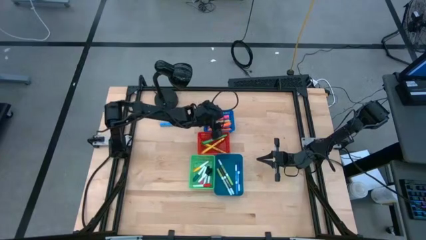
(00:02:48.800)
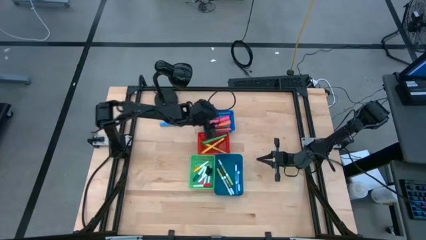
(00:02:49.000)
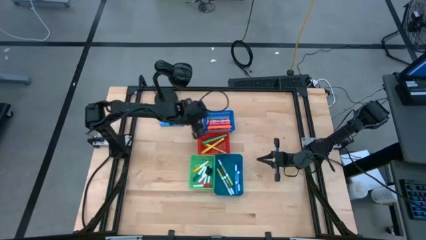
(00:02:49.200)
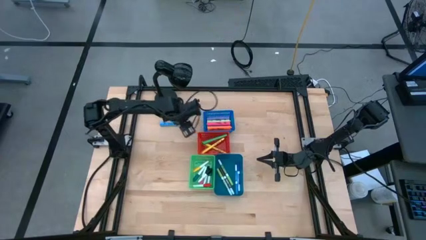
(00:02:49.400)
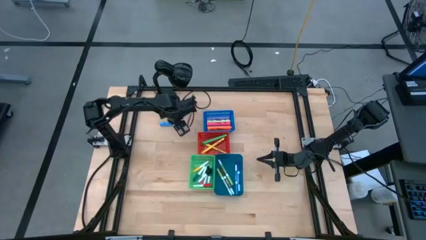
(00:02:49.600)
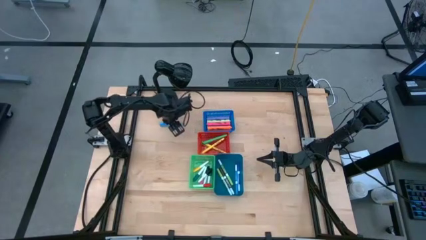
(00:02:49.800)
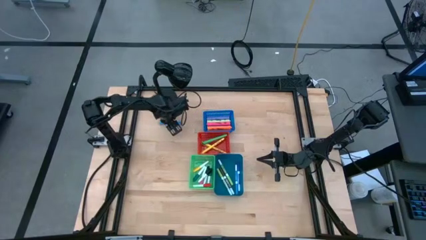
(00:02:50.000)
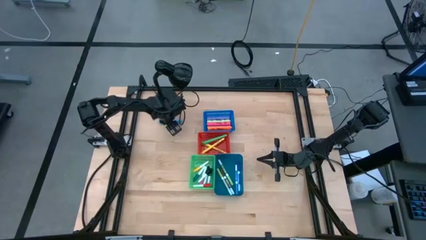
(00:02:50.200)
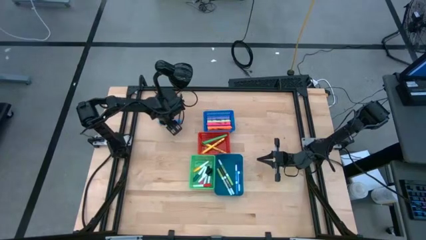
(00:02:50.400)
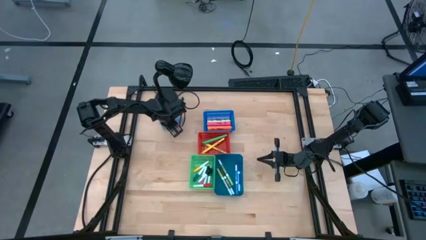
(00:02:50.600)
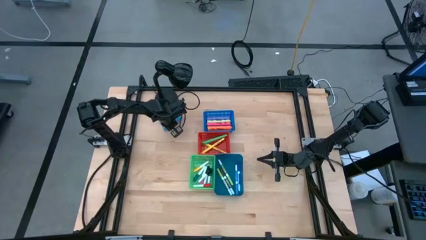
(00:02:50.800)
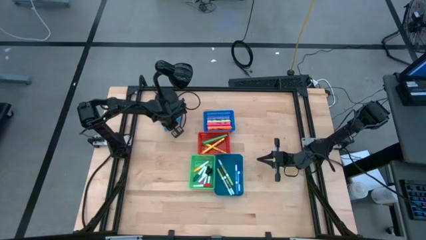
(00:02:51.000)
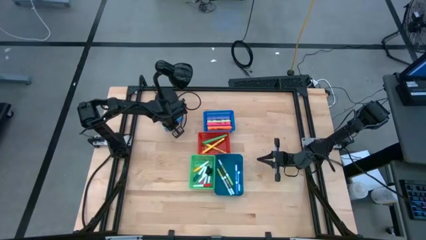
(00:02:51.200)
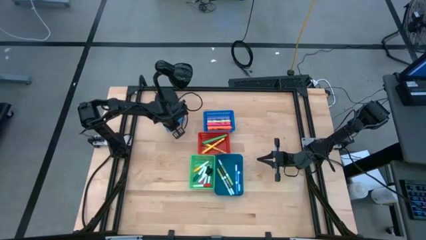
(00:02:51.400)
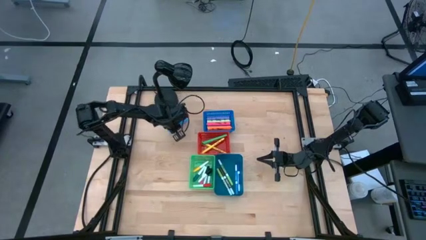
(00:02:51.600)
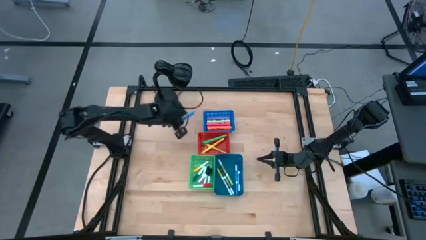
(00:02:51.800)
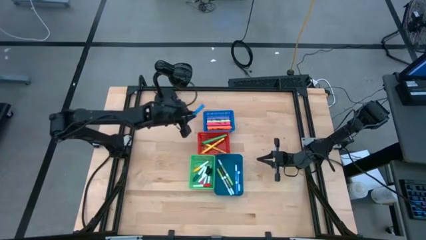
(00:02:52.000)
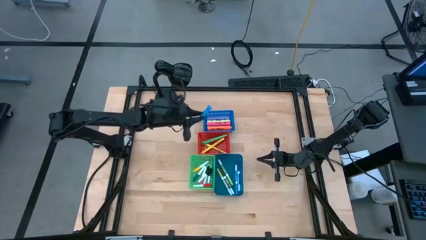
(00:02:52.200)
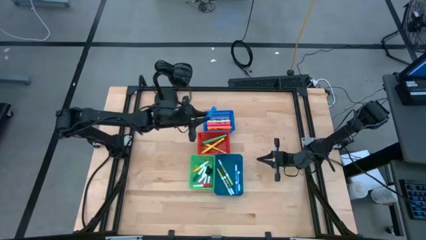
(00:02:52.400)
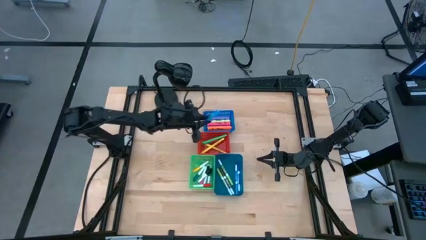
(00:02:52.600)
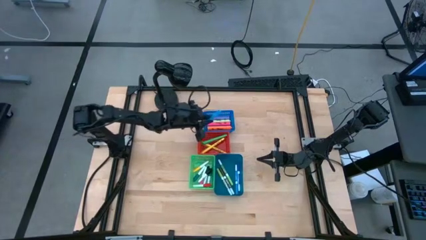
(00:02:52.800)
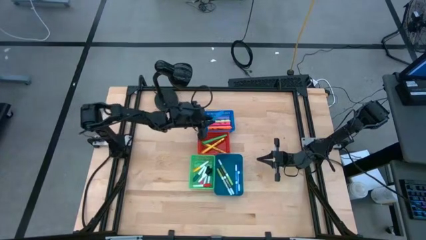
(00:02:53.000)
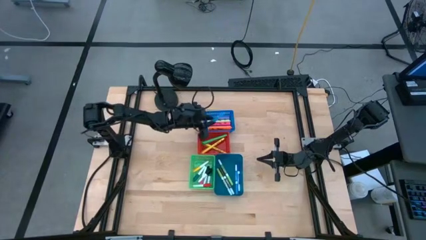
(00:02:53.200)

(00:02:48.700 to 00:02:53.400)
Task: Pick & Place Markers
Put the large light blue highlighter pen into the blue bin

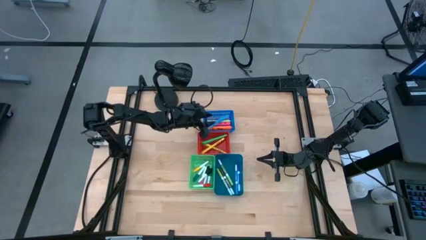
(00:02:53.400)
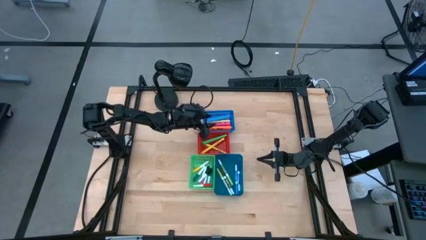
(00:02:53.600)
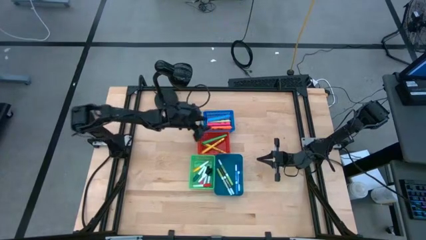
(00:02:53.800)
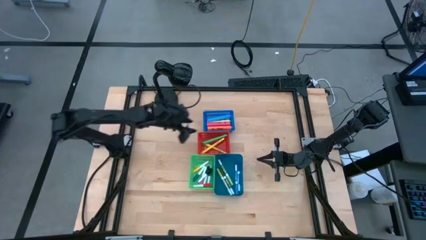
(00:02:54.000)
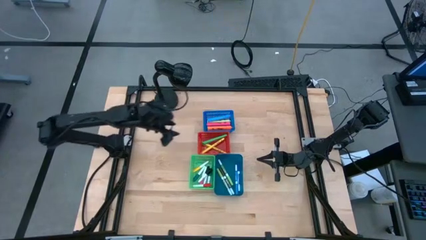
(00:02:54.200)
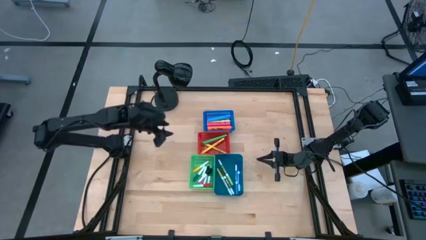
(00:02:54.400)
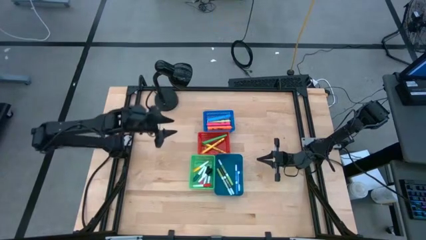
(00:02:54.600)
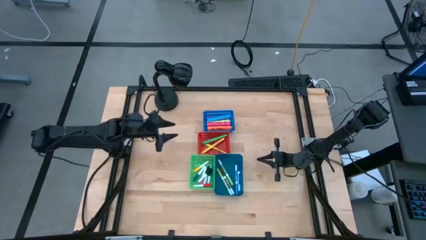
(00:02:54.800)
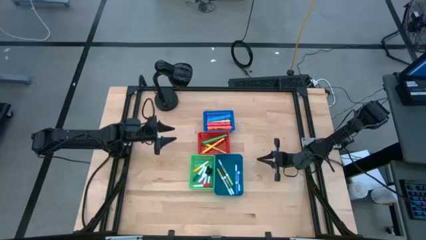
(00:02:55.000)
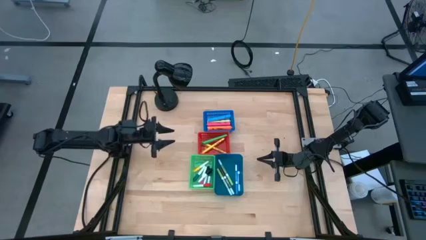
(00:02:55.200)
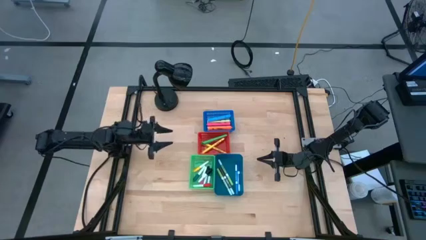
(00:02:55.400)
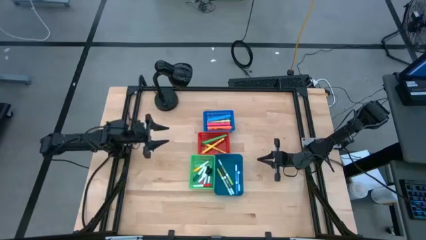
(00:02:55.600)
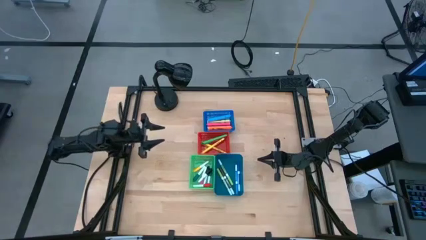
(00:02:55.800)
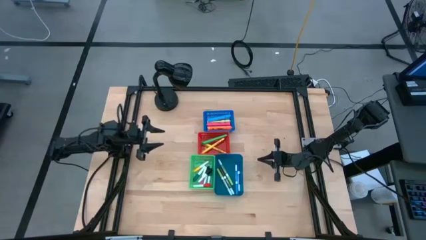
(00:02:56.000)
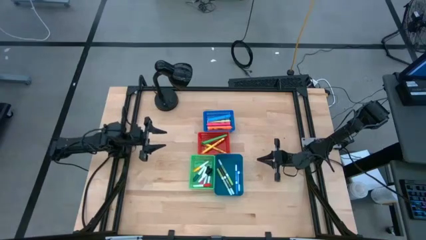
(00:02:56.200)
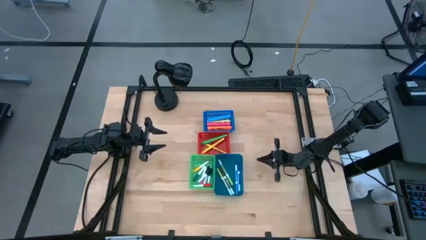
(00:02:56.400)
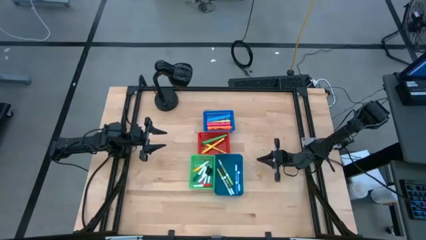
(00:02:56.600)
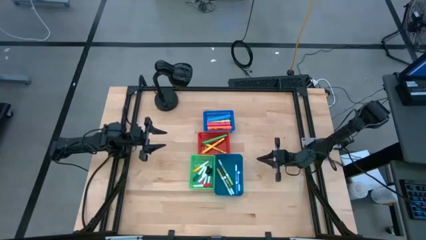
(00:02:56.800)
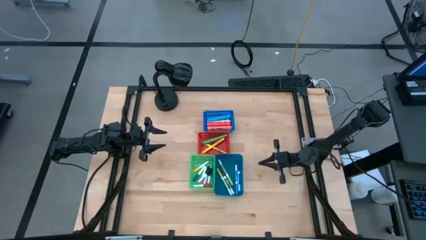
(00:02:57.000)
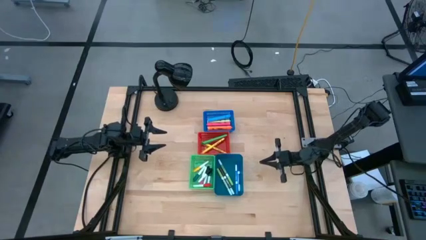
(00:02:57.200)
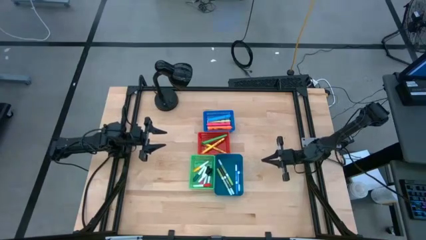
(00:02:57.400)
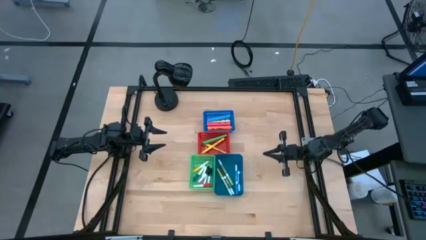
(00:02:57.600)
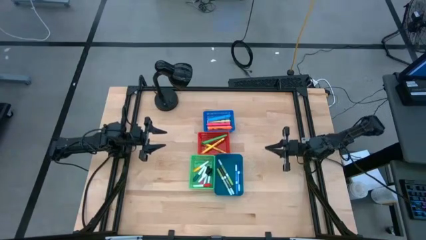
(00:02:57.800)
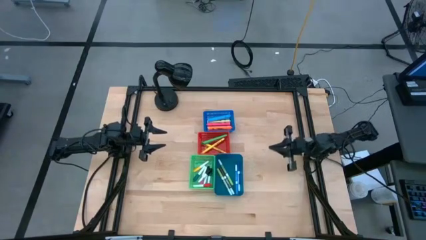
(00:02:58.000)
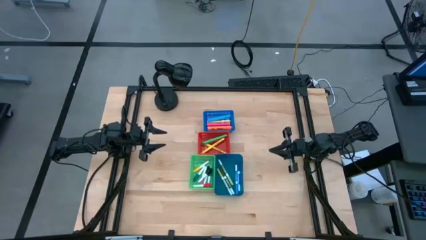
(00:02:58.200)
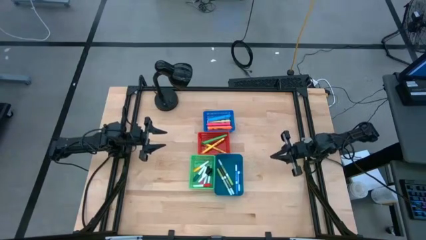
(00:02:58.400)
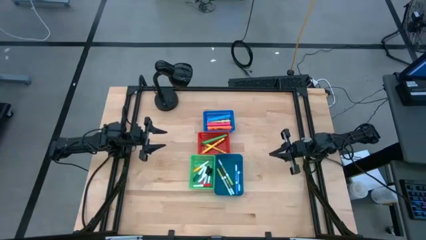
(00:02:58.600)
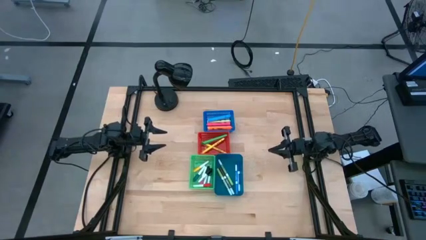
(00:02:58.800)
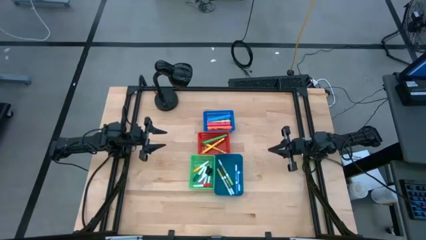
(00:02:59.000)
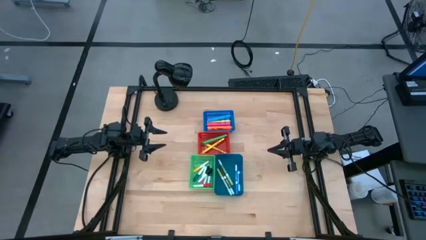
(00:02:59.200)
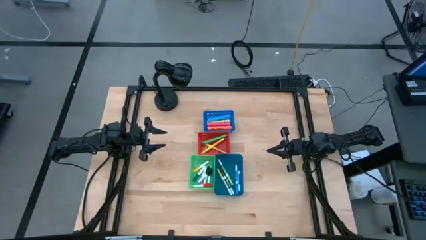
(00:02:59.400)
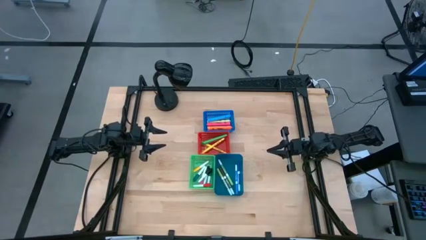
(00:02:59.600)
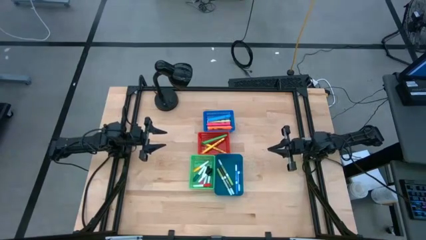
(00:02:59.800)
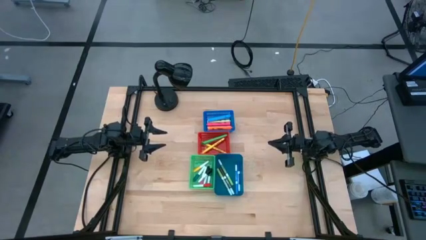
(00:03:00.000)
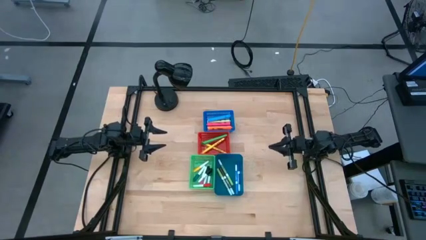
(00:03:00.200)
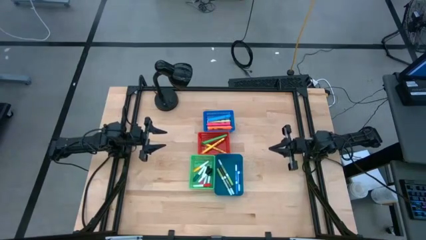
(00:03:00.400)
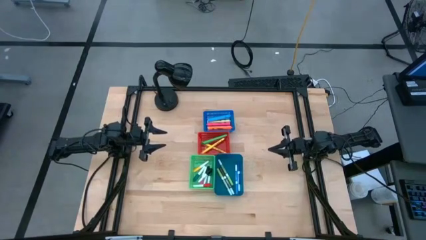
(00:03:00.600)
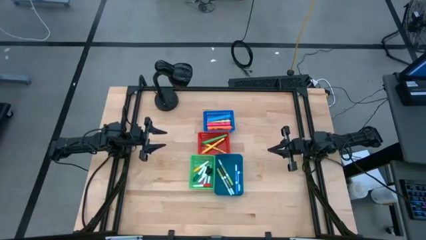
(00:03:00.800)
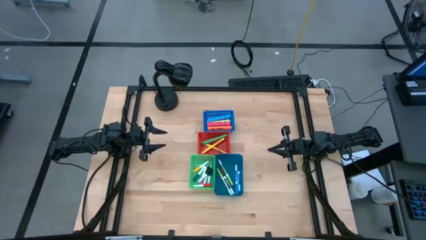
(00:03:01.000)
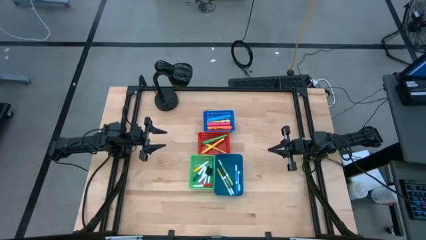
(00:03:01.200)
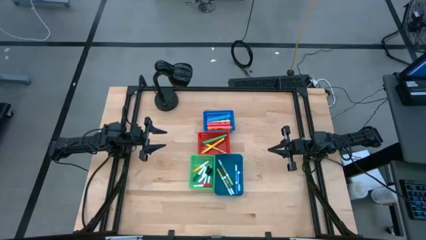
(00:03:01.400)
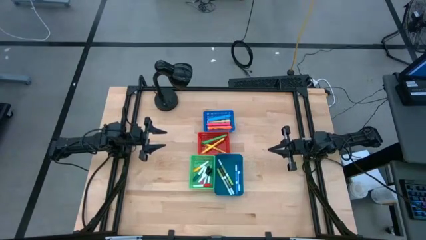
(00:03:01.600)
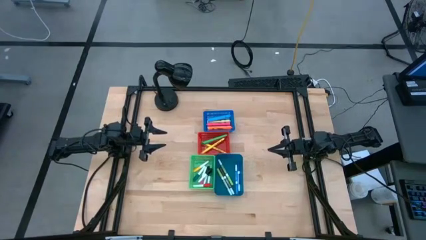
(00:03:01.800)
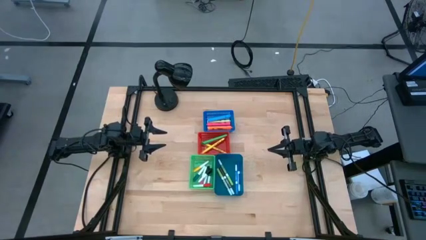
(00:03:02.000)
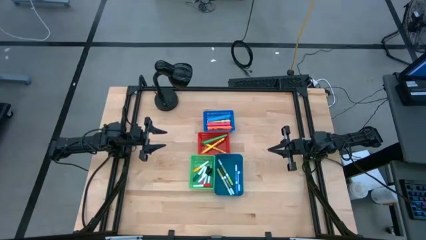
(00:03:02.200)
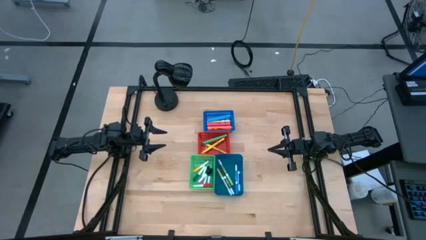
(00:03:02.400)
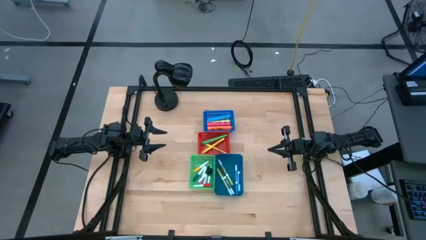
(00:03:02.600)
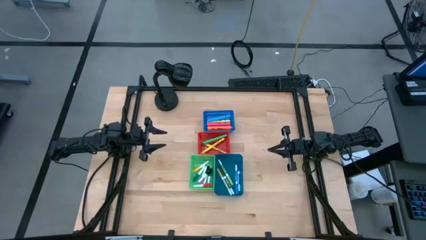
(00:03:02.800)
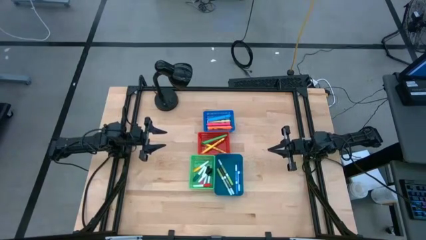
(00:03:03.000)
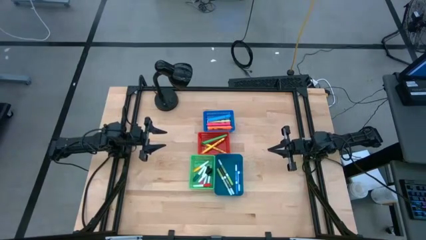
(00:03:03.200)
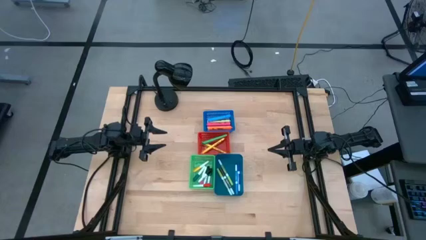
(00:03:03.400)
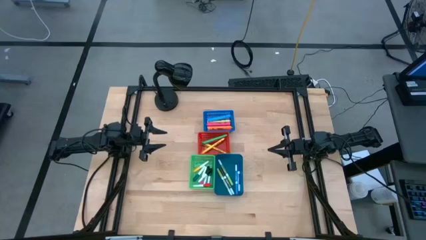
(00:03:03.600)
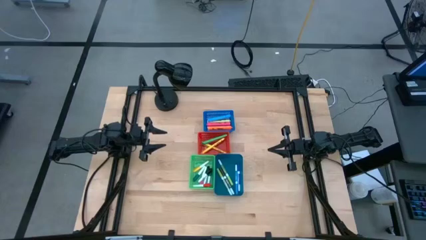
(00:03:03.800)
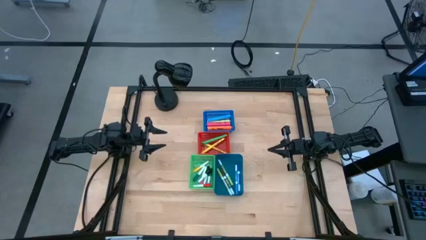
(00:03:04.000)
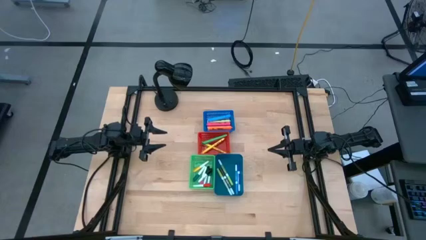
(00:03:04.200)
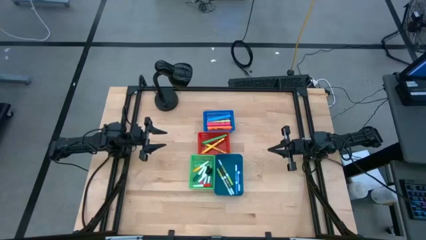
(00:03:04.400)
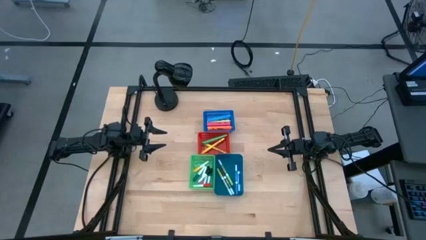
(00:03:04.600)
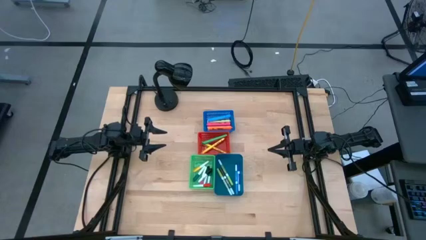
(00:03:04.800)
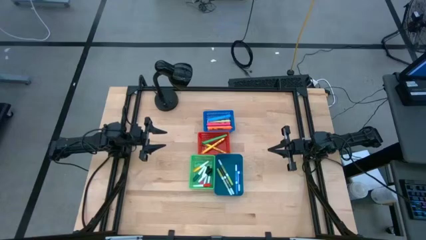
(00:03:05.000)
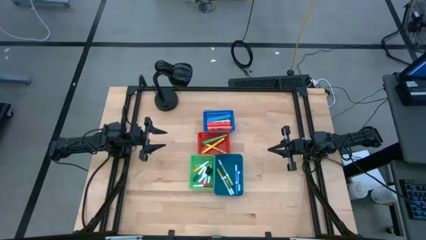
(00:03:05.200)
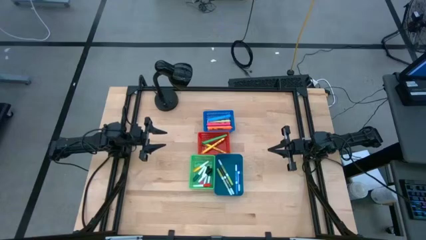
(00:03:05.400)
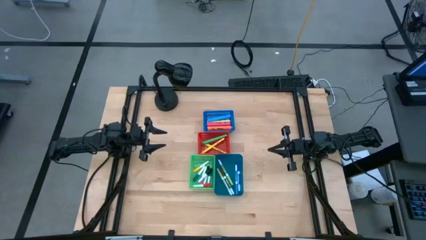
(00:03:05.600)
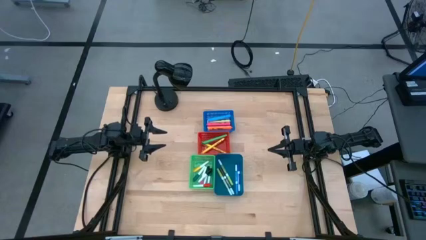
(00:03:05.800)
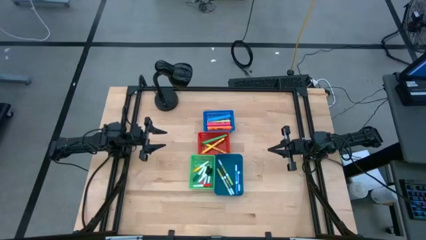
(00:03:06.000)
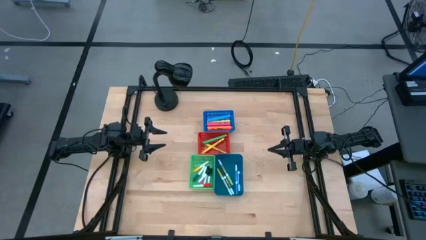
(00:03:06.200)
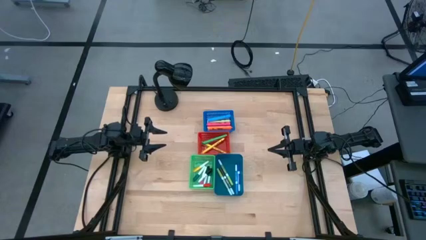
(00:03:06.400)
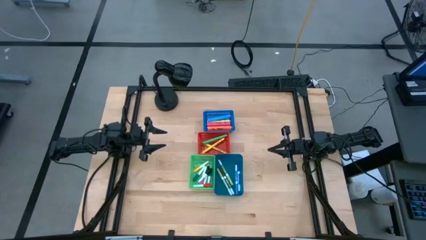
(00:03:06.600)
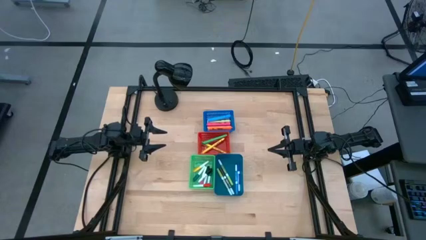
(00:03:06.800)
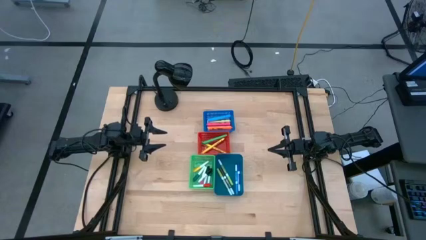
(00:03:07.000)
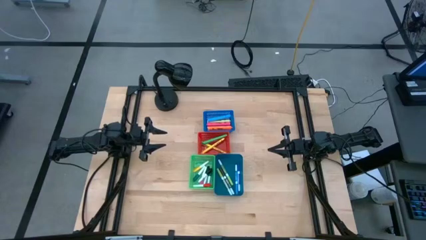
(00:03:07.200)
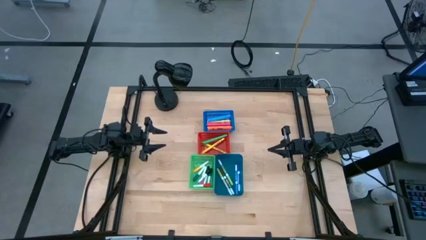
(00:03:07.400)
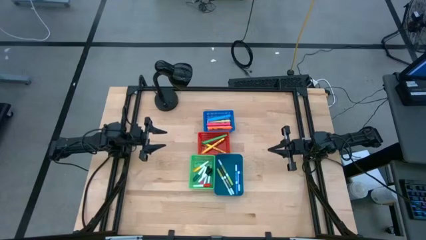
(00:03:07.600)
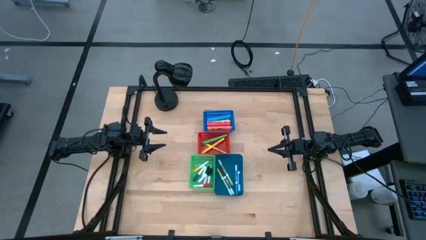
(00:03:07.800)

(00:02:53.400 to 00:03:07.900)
Return to Home Position
